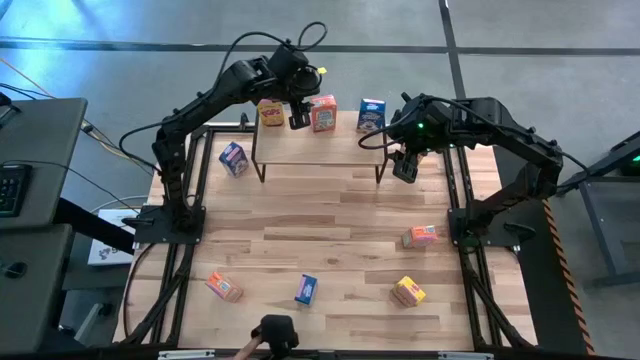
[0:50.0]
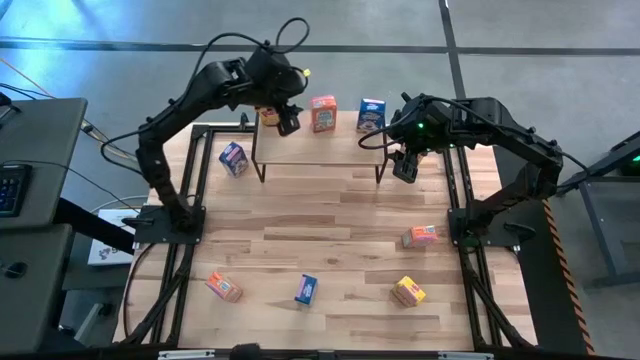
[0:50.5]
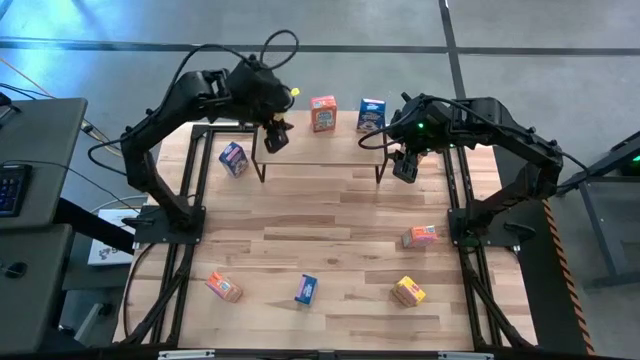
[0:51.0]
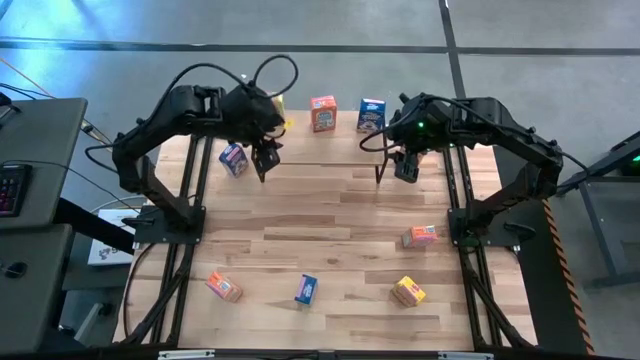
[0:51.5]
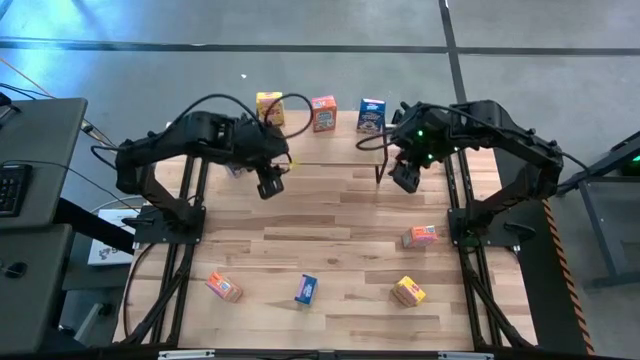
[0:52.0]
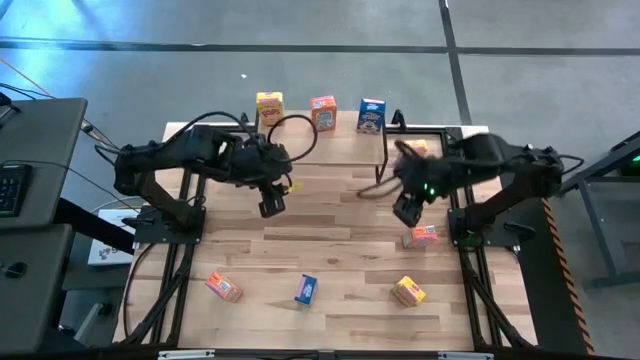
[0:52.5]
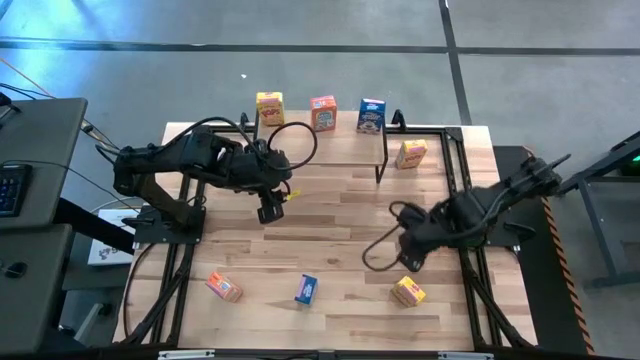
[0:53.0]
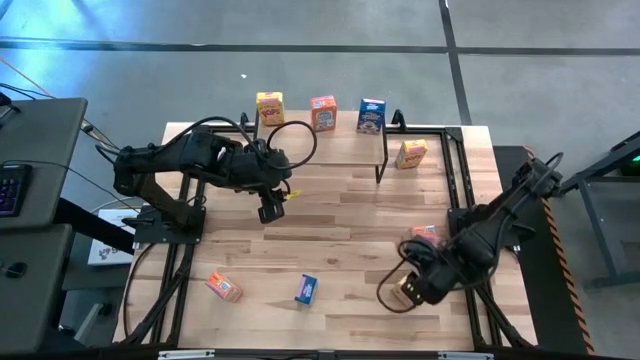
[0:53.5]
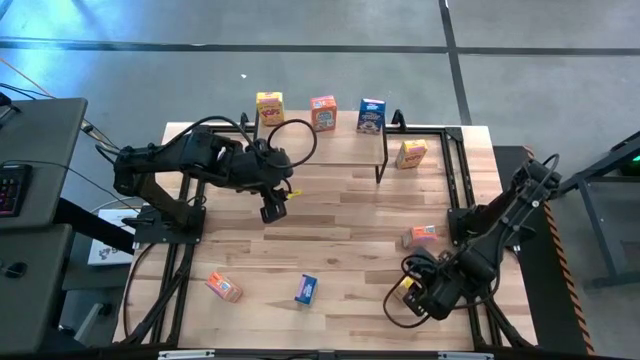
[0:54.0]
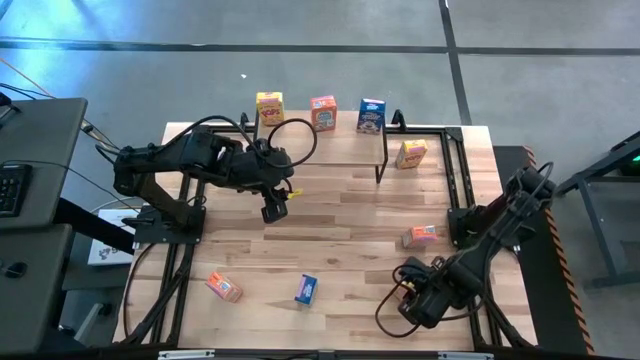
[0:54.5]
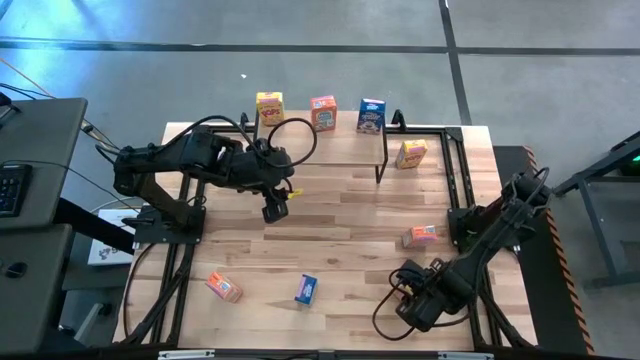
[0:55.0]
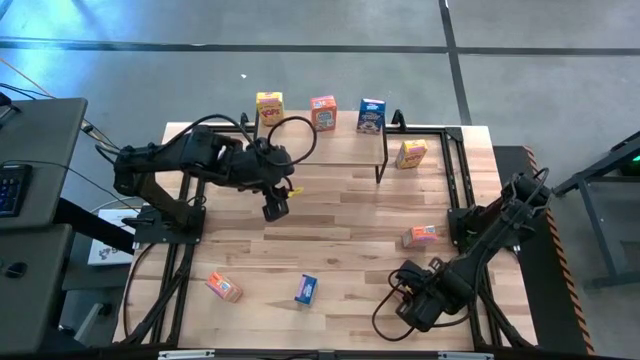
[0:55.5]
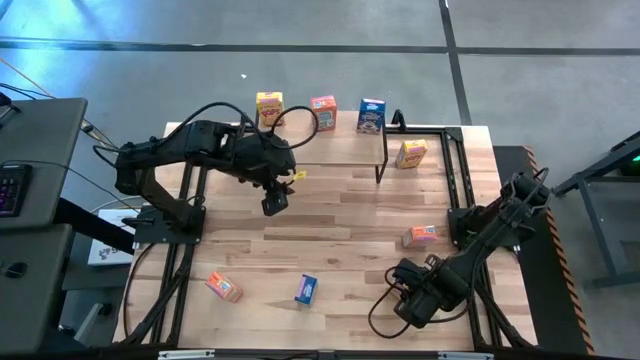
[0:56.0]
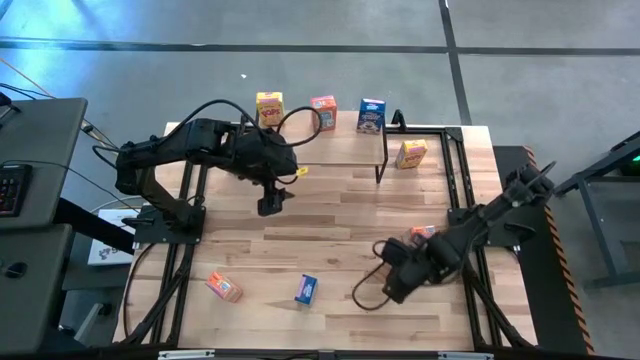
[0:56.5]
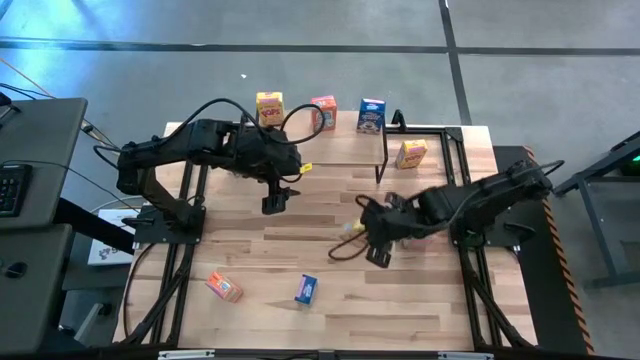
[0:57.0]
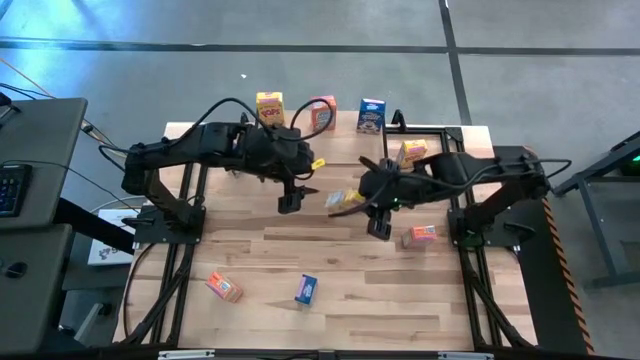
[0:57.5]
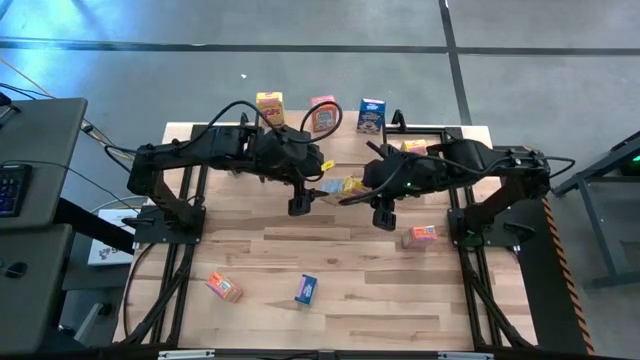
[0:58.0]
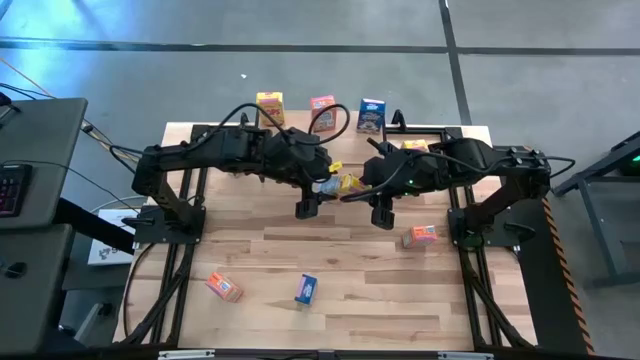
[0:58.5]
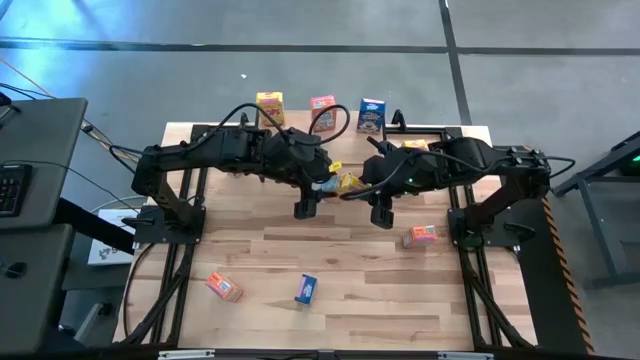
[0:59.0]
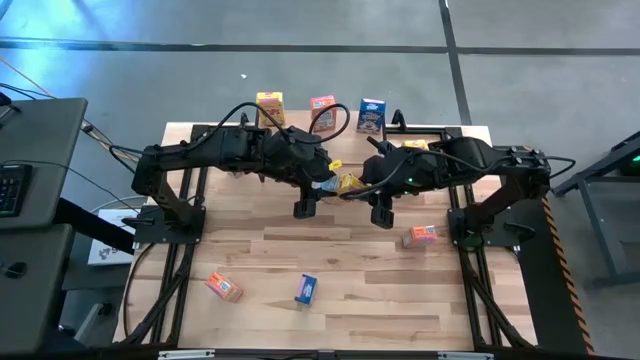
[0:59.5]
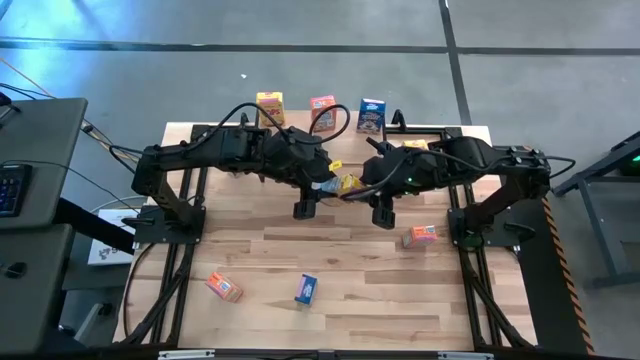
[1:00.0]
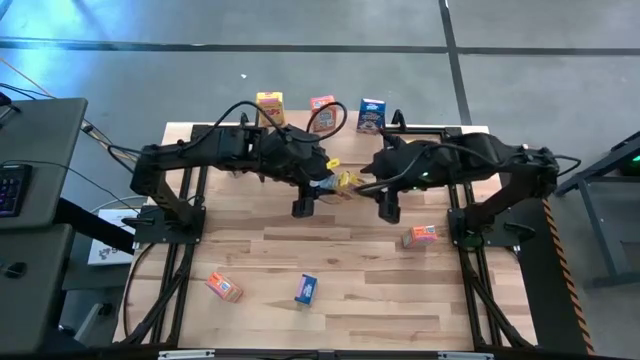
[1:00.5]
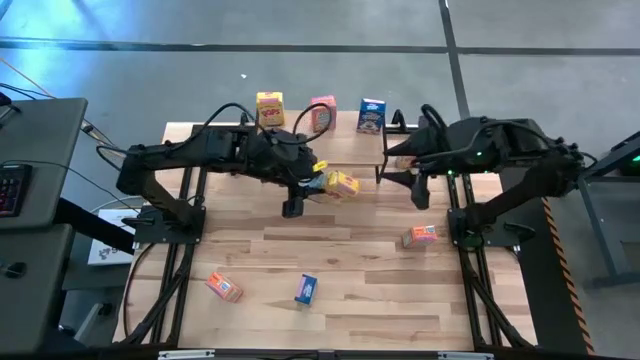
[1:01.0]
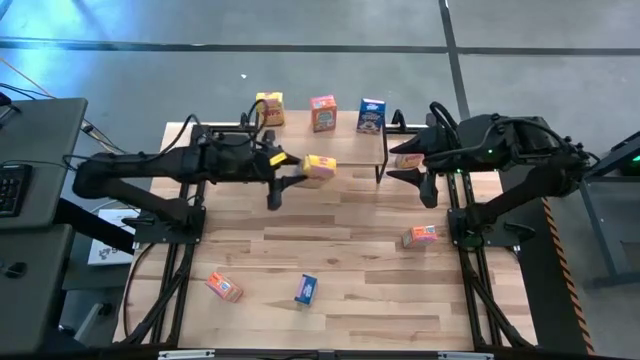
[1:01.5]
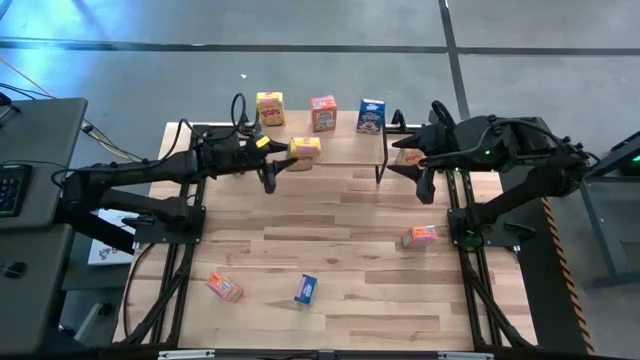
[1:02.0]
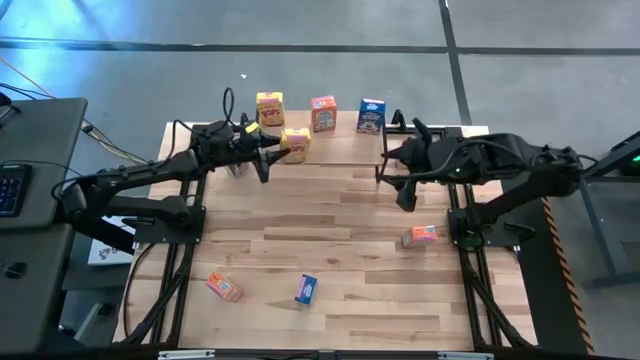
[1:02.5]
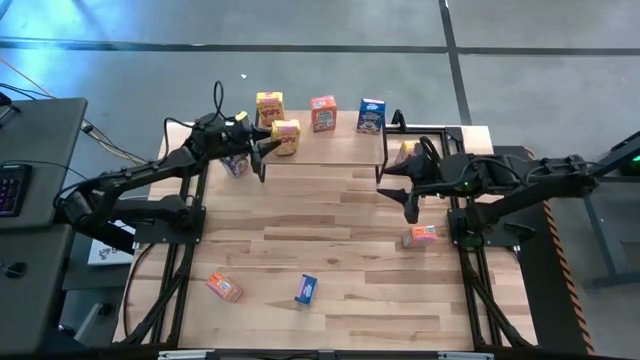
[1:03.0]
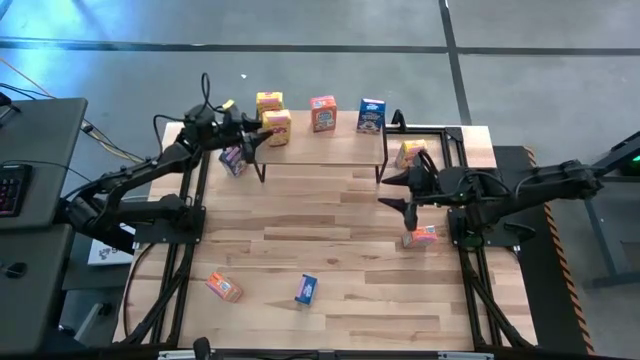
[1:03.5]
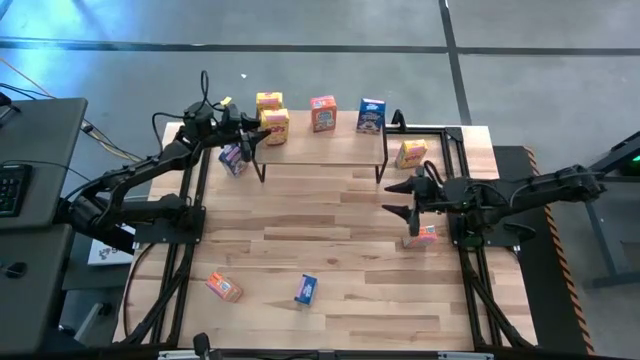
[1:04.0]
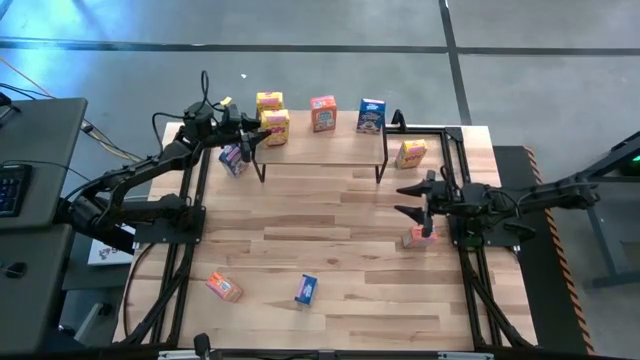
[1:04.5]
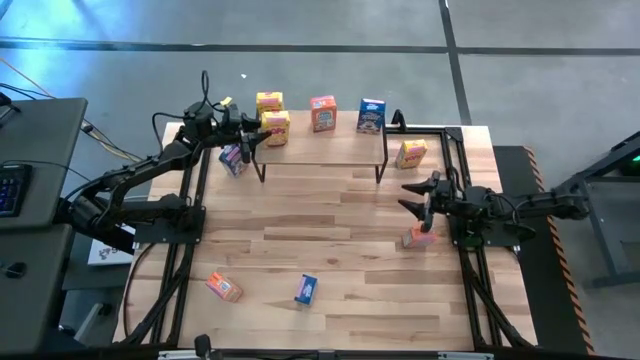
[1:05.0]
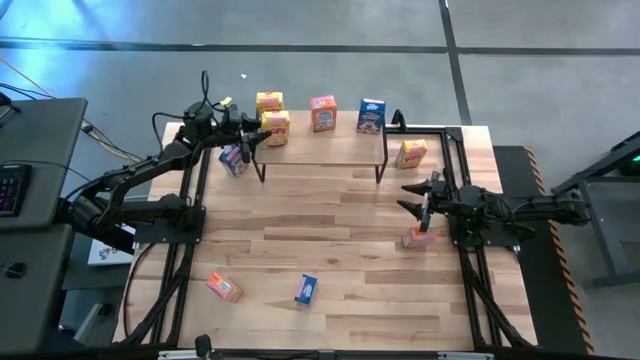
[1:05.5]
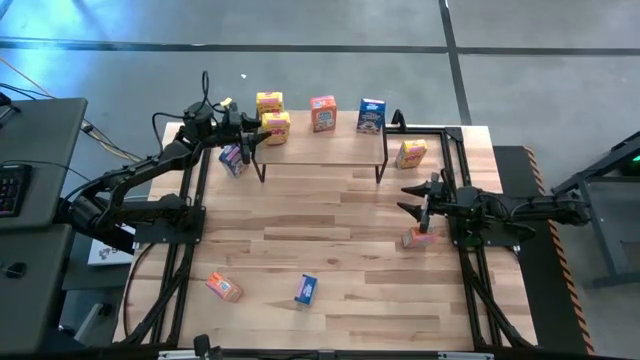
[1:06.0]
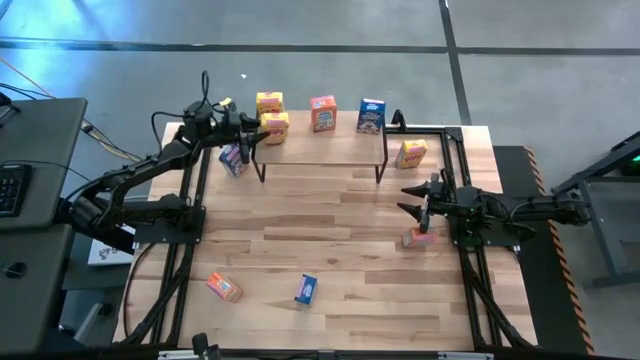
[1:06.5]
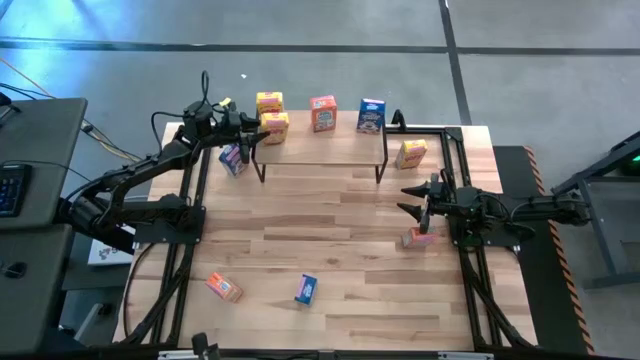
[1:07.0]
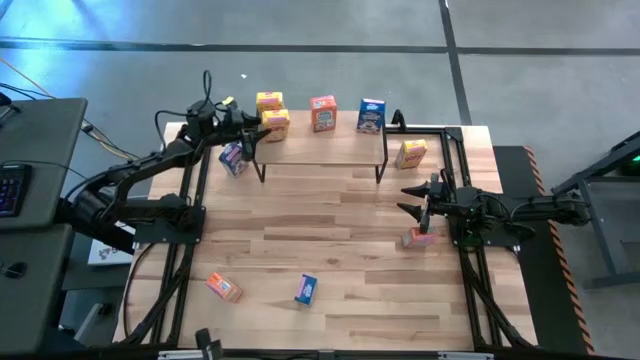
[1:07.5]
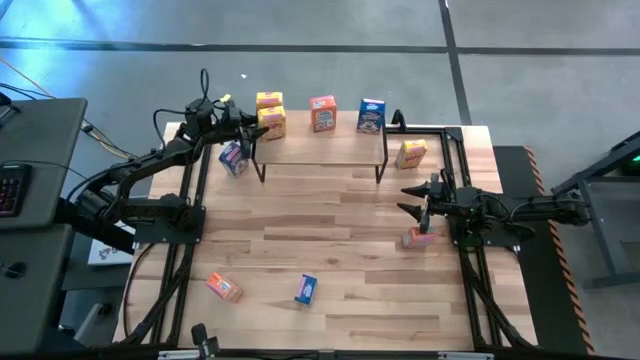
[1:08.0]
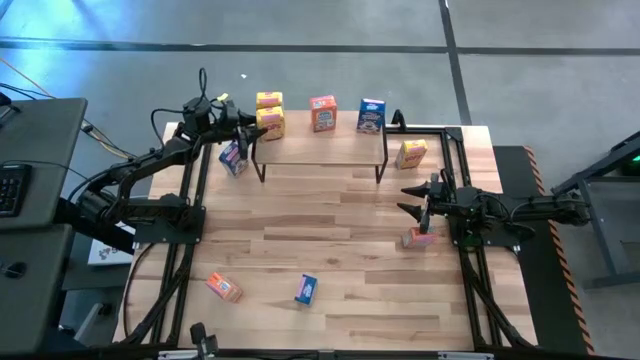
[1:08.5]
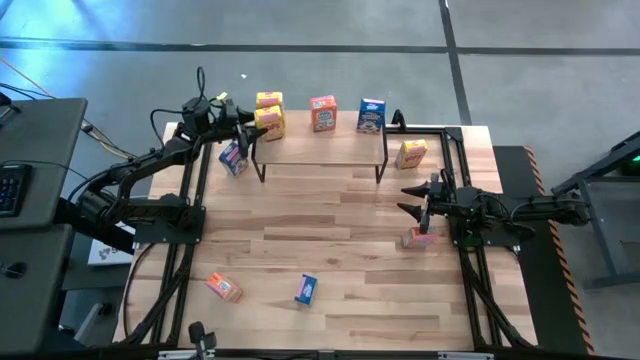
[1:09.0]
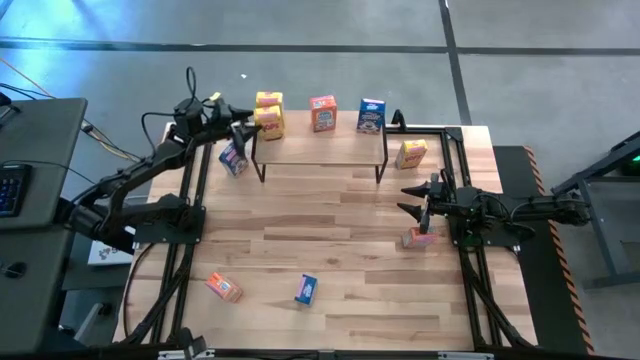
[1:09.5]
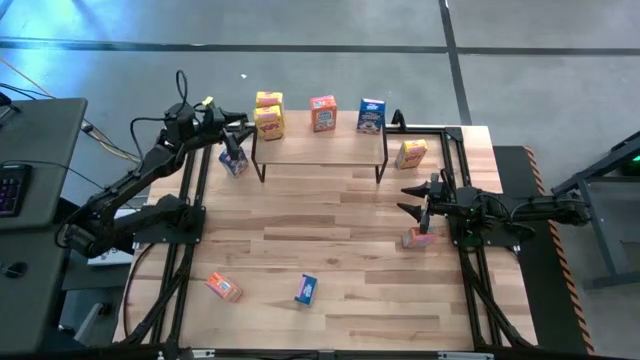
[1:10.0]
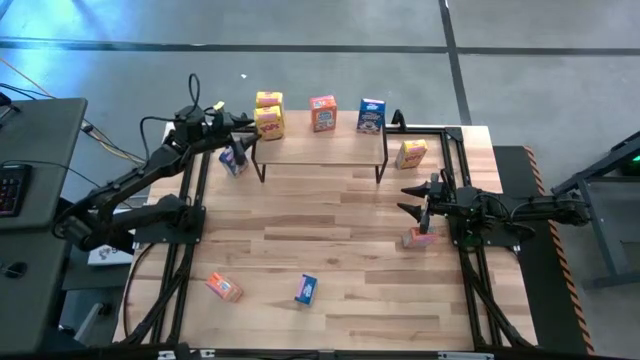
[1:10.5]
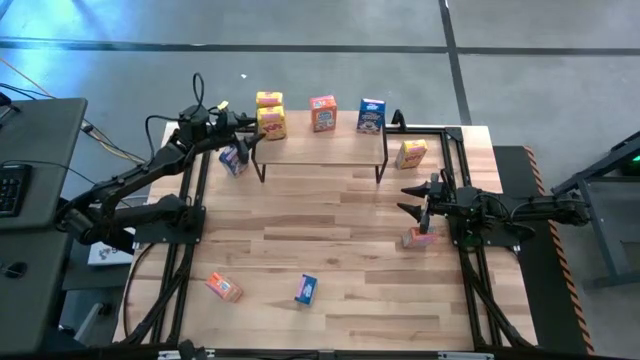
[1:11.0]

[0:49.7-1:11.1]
Task: Stack cereal on shelf
Put the bottom yellow cereal box aligned with the other yellow cereal box on the shelf
